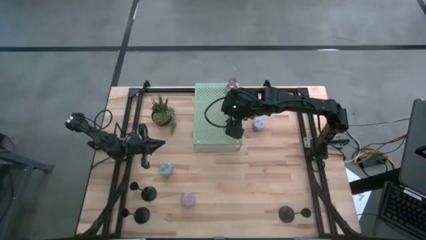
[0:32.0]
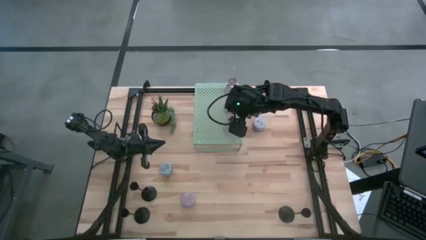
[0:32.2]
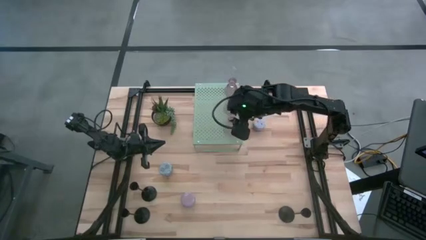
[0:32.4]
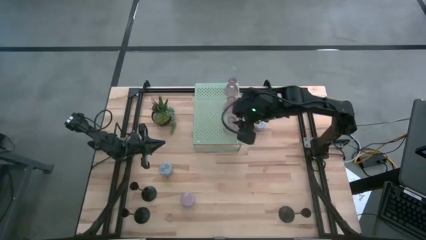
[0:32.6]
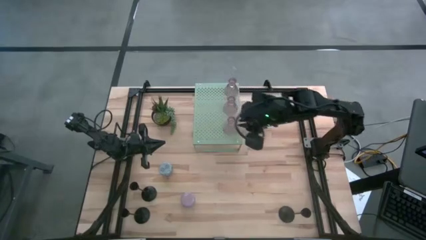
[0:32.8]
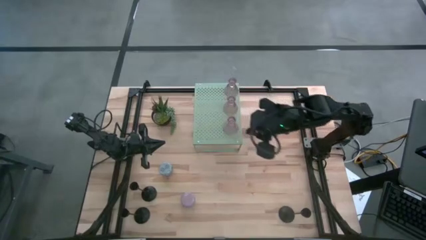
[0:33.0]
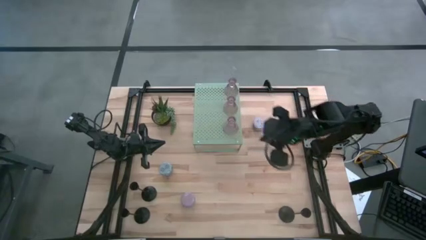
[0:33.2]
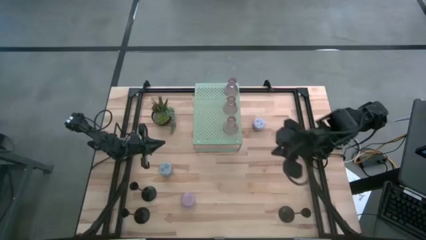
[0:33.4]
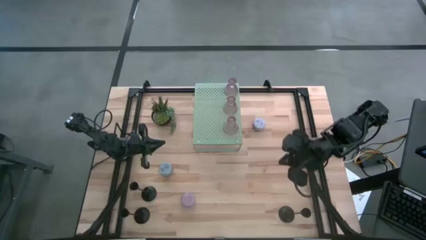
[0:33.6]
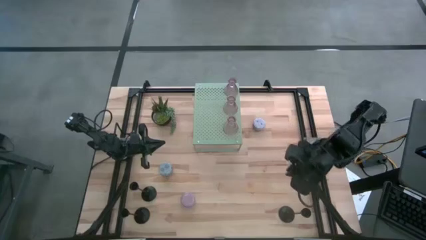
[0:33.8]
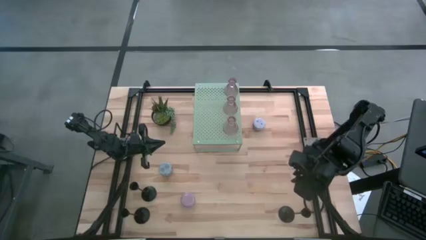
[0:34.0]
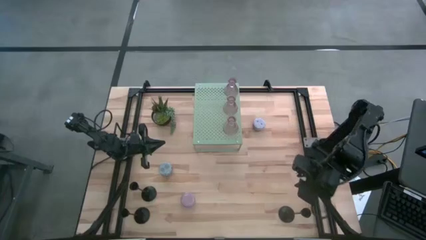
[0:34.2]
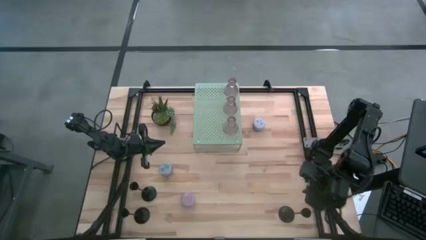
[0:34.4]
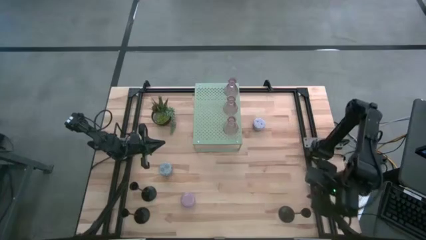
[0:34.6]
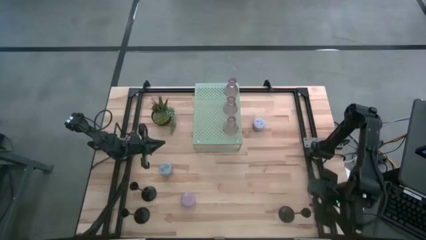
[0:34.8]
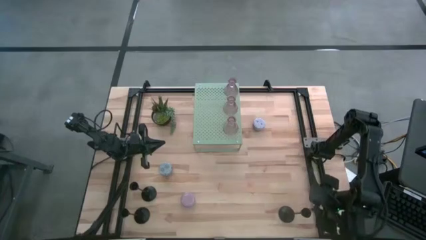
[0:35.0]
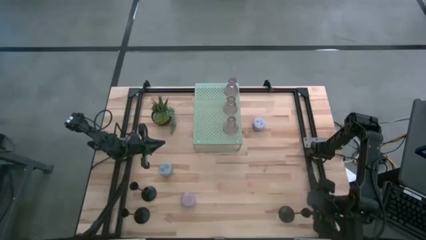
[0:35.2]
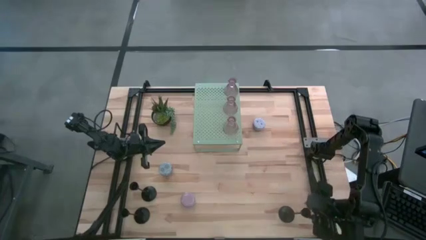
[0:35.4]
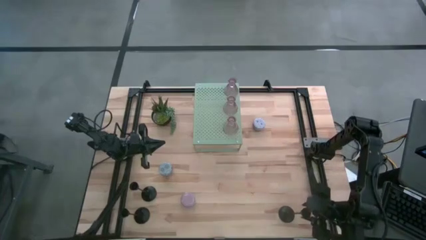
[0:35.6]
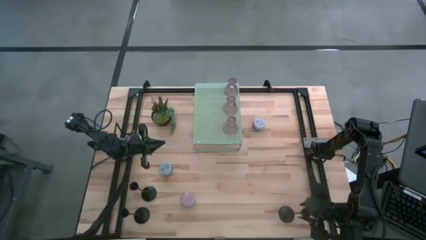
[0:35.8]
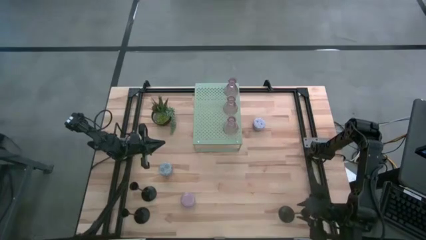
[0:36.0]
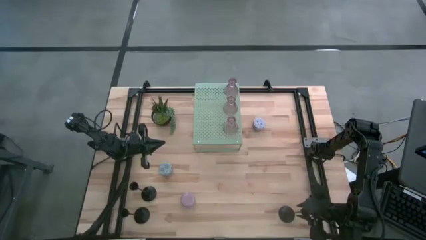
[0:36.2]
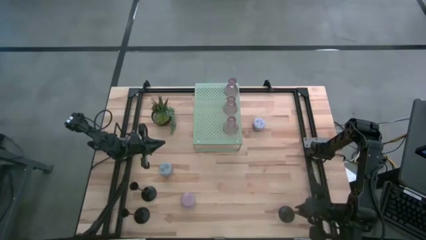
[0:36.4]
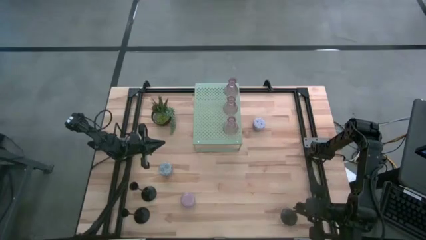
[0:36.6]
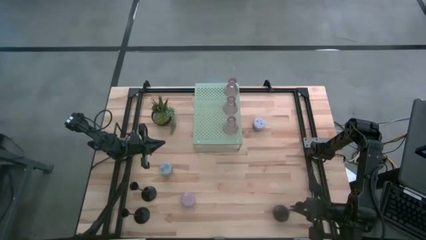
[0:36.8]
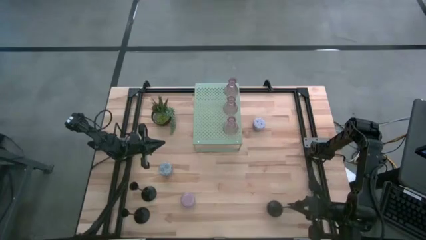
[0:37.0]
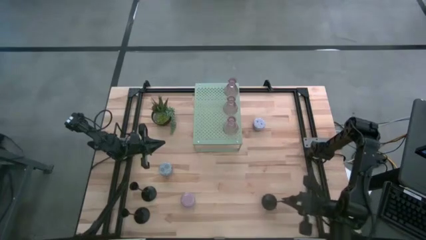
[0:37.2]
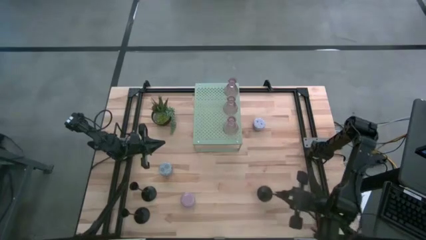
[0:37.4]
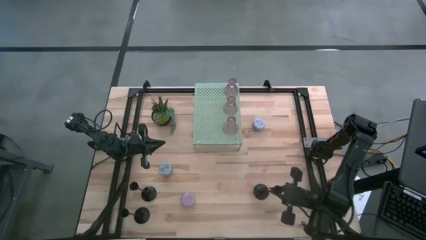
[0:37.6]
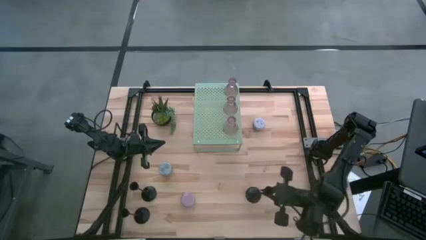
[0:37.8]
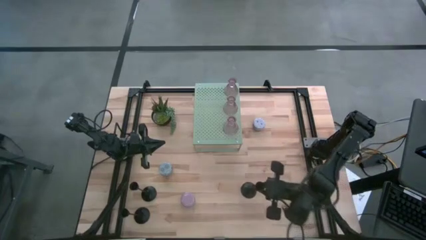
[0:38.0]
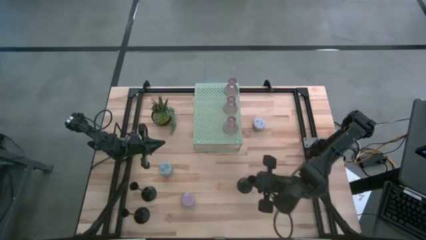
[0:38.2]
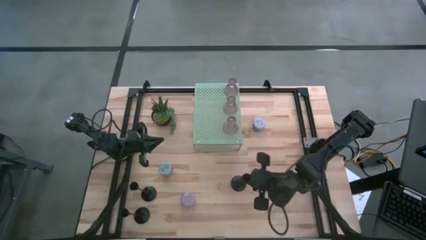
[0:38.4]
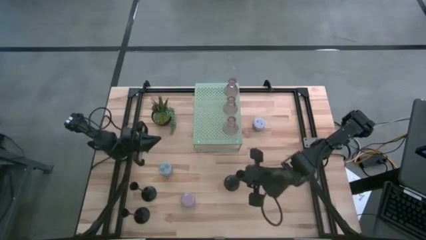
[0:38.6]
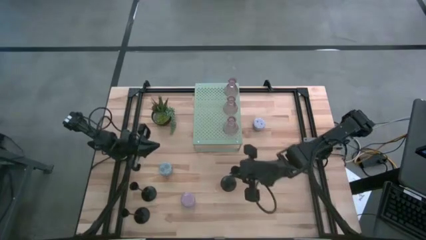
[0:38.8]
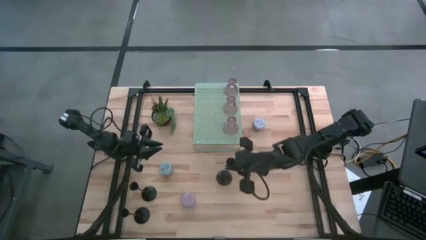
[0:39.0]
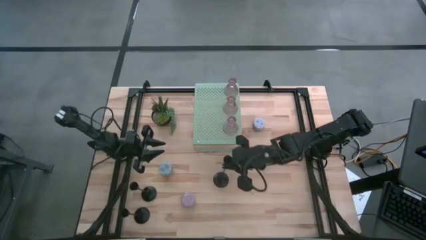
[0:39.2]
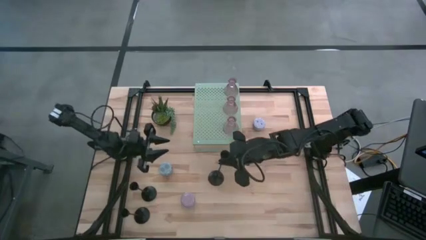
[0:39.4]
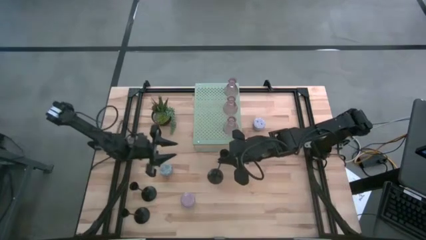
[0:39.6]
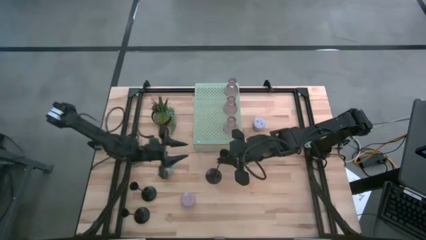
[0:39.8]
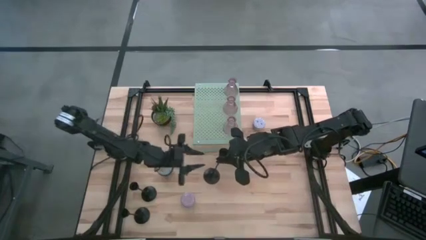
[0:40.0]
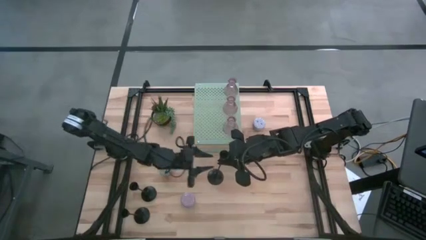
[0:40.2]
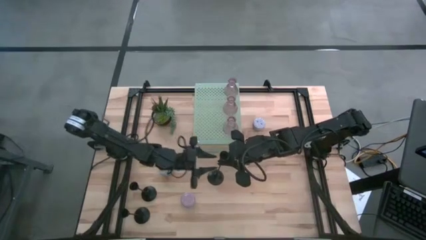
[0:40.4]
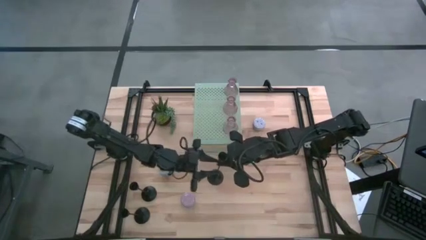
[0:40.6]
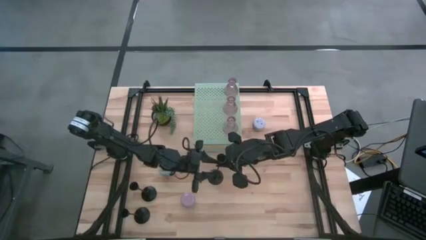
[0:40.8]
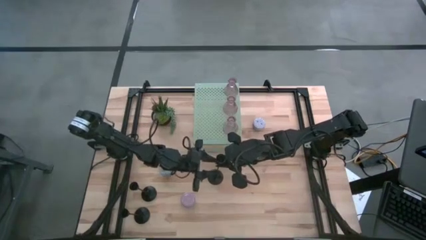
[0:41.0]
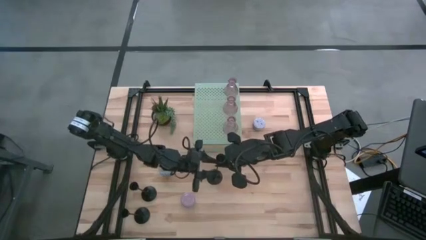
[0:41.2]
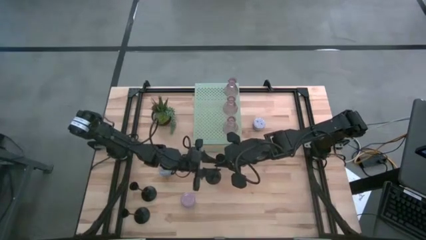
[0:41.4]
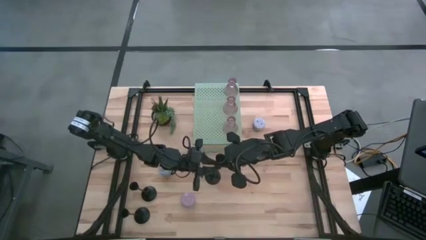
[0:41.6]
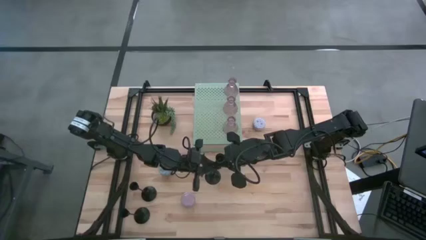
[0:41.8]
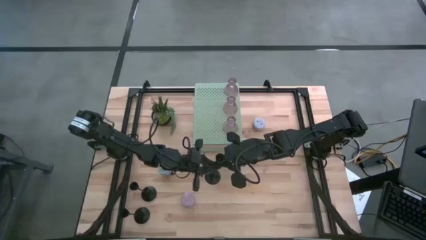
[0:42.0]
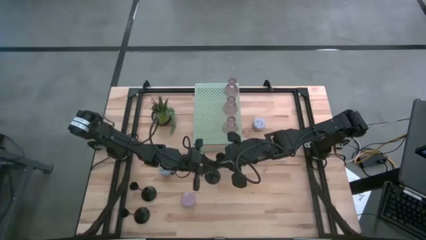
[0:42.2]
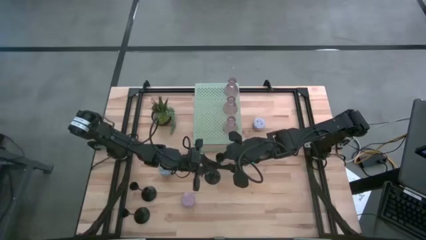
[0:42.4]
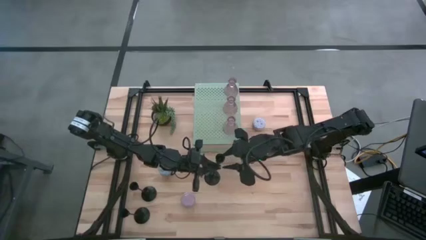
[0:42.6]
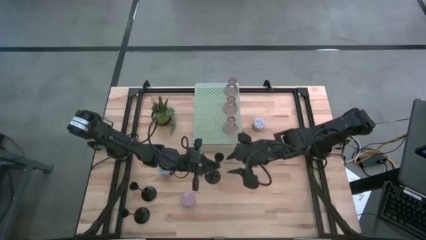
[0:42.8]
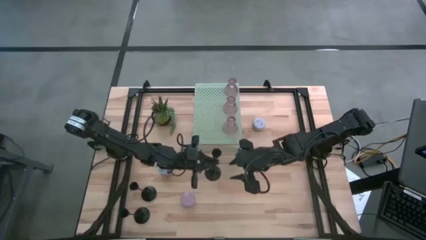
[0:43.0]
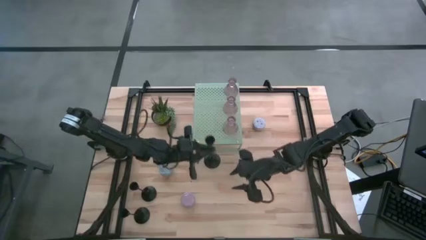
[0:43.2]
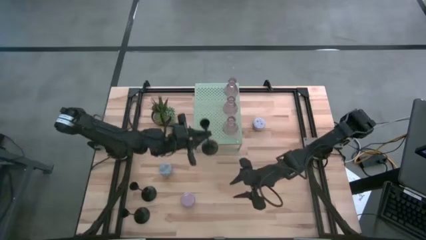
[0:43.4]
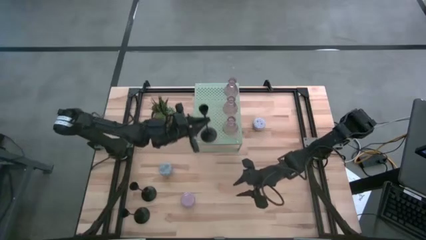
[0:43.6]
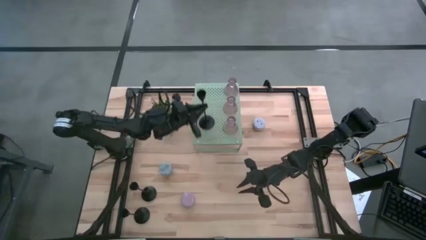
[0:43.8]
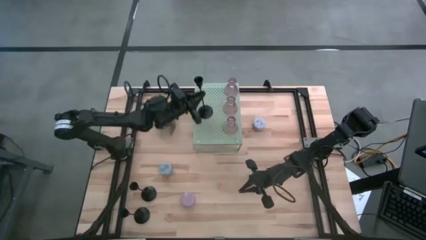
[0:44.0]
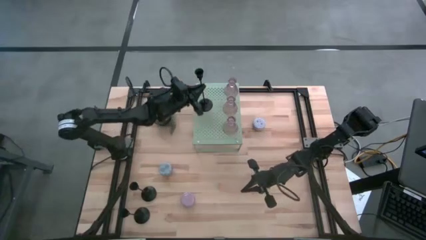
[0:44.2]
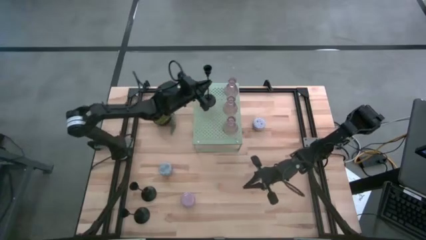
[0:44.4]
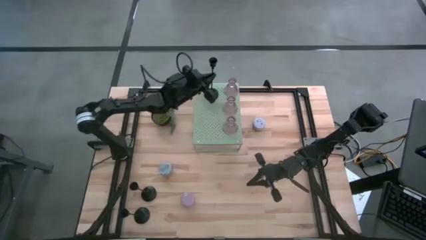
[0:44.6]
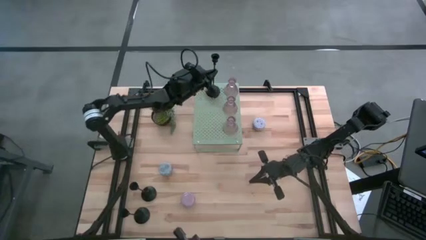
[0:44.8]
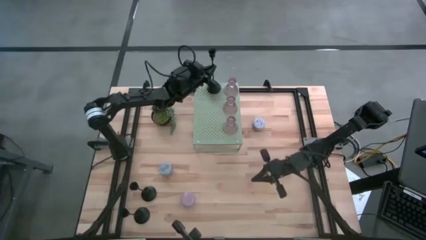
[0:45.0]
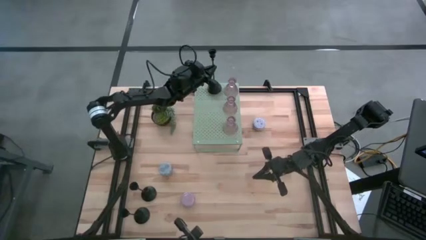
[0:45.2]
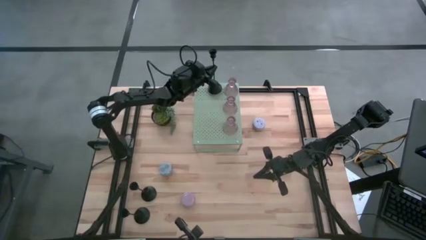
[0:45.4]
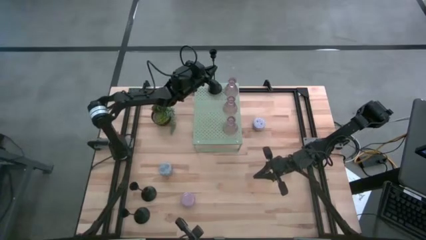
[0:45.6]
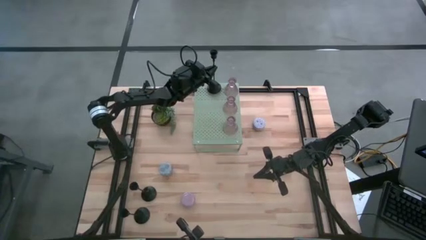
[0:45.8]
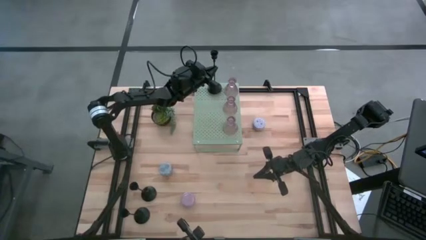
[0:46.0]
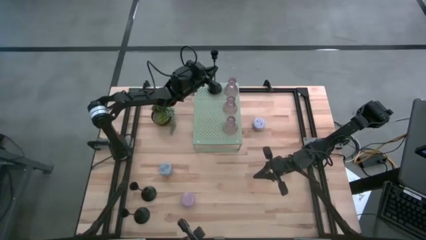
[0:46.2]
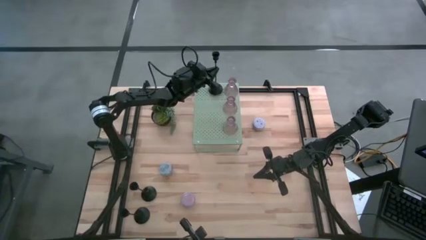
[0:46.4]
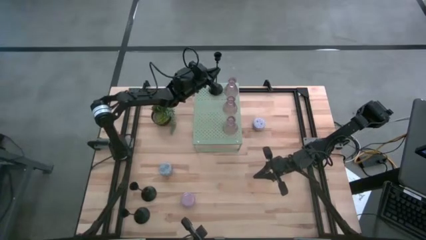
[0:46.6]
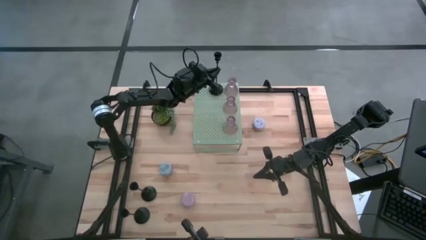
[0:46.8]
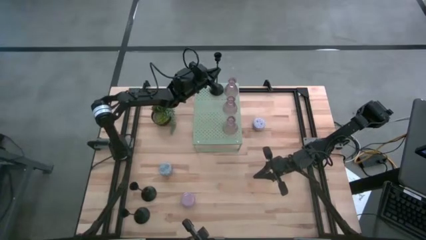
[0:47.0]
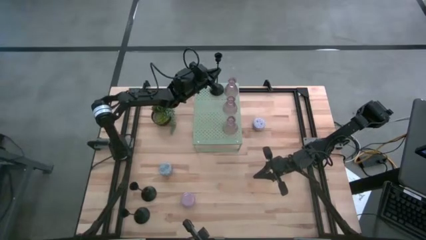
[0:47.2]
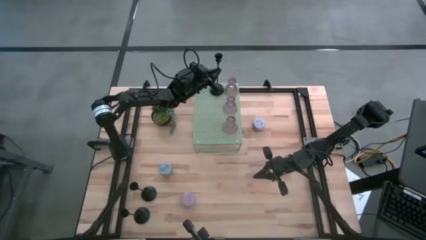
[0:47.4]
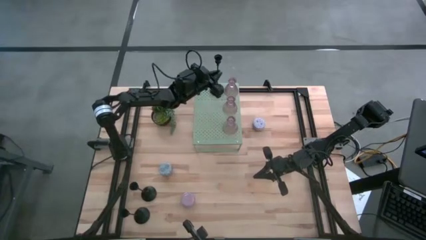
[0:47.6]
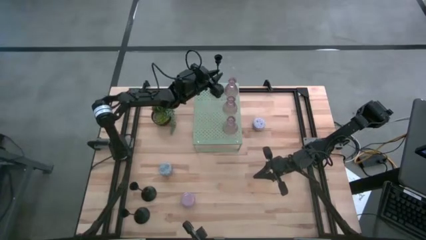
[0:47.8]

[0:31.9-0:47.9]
Task: Pick & Place candle stick holders
Put the bottom right black candle holder on the shelf
